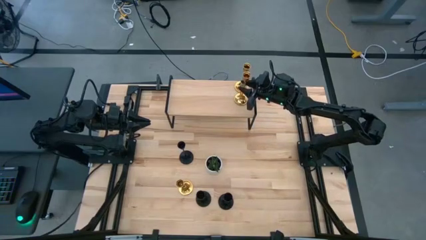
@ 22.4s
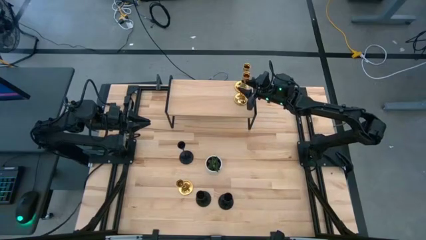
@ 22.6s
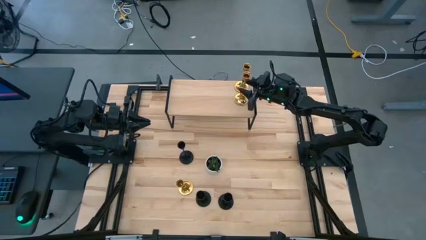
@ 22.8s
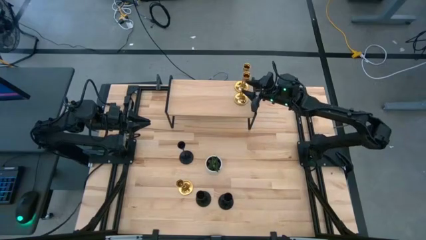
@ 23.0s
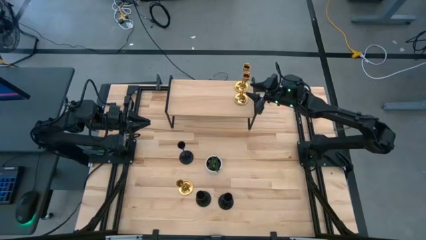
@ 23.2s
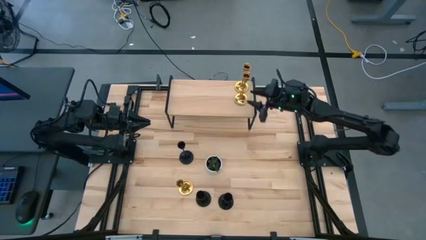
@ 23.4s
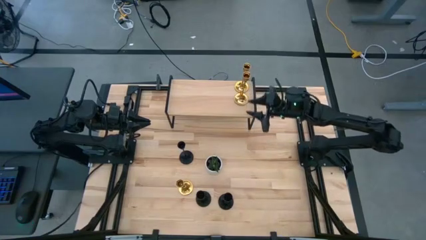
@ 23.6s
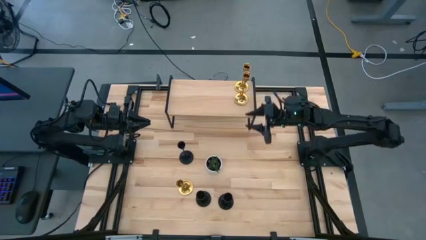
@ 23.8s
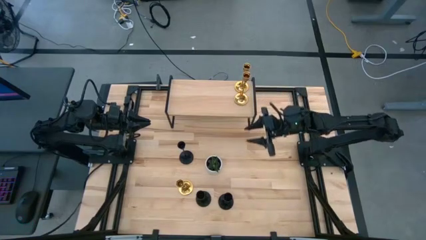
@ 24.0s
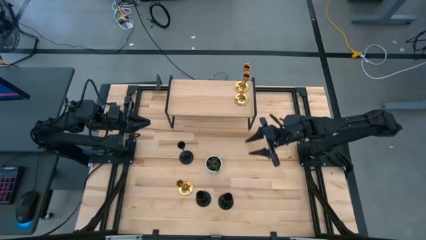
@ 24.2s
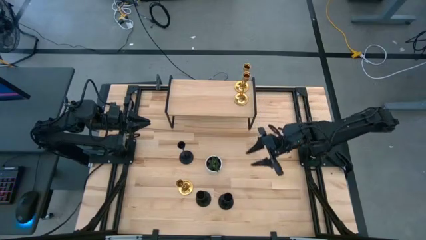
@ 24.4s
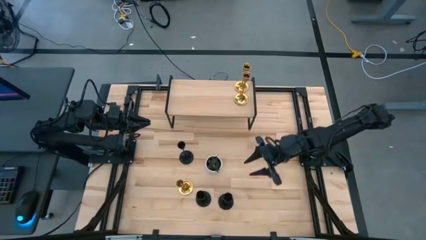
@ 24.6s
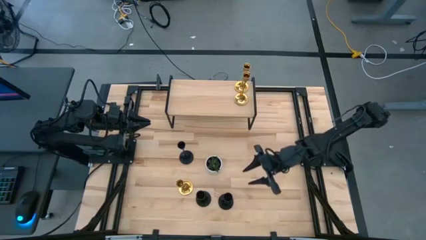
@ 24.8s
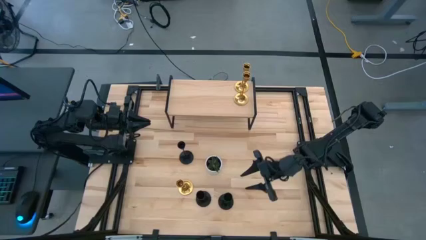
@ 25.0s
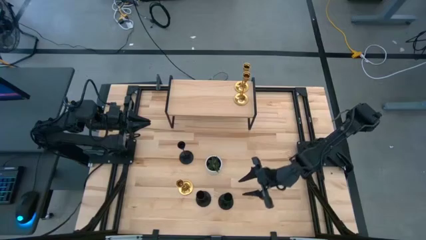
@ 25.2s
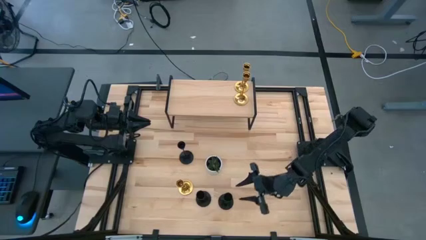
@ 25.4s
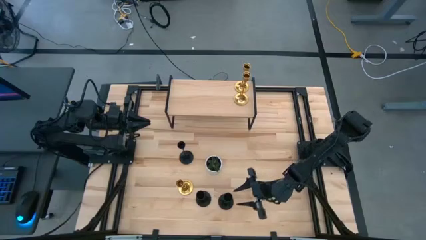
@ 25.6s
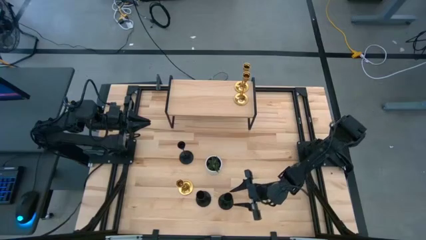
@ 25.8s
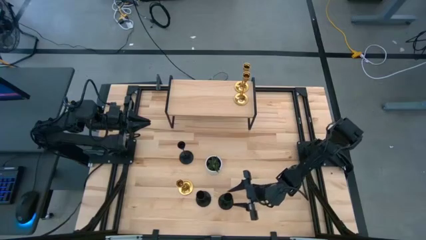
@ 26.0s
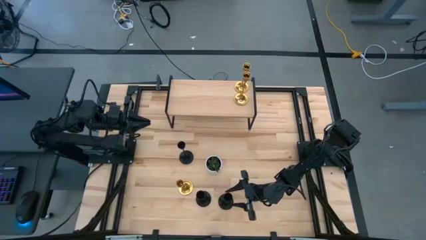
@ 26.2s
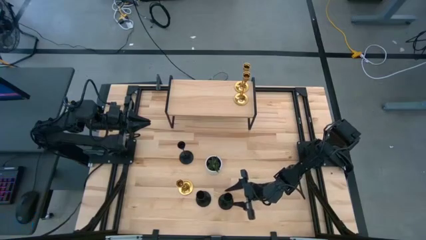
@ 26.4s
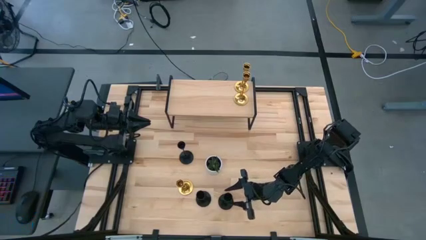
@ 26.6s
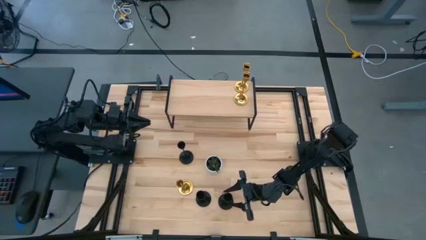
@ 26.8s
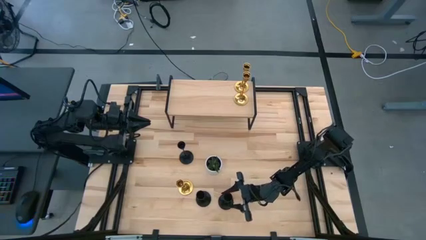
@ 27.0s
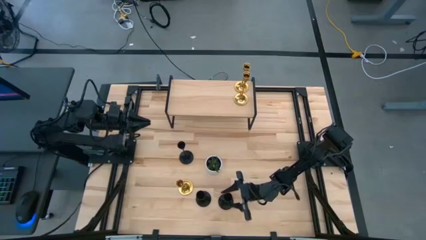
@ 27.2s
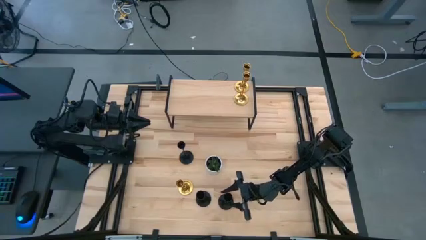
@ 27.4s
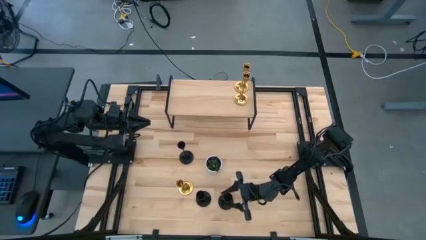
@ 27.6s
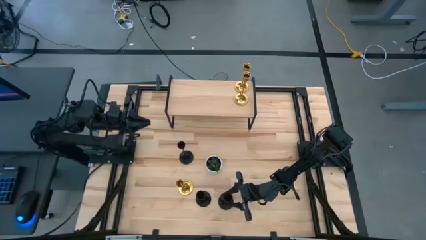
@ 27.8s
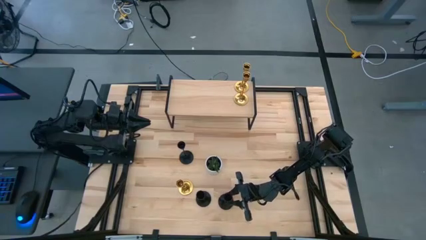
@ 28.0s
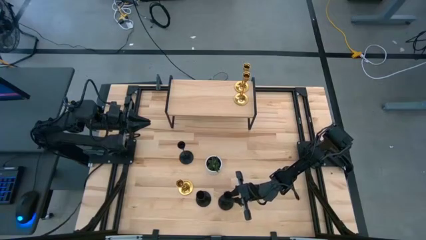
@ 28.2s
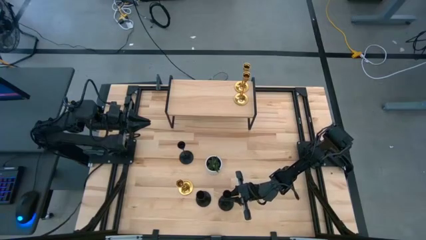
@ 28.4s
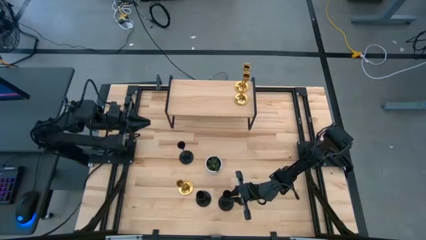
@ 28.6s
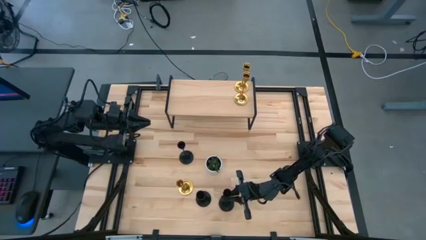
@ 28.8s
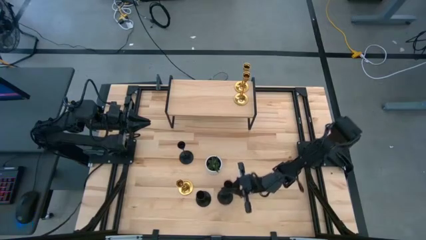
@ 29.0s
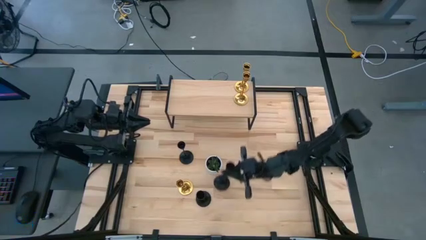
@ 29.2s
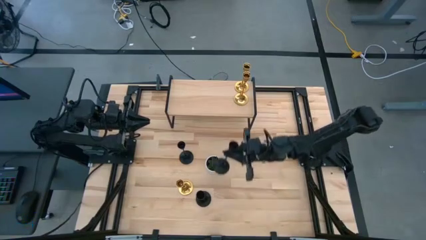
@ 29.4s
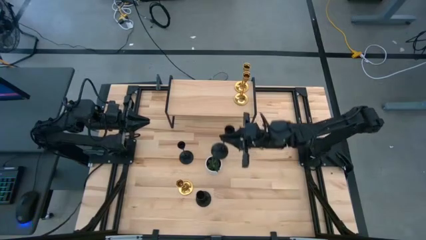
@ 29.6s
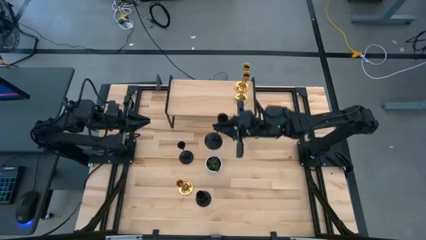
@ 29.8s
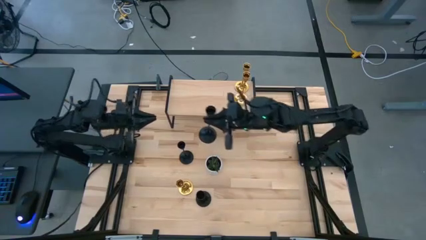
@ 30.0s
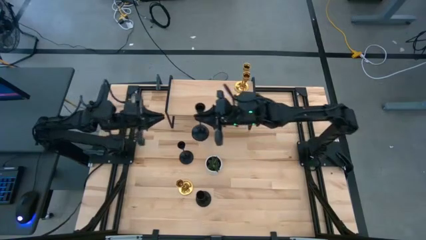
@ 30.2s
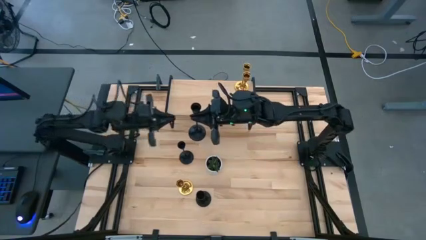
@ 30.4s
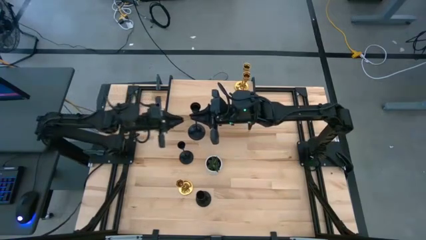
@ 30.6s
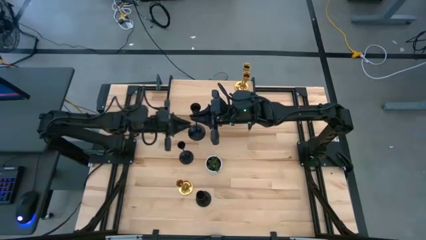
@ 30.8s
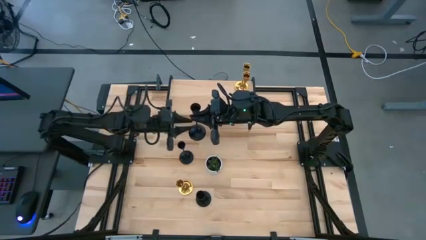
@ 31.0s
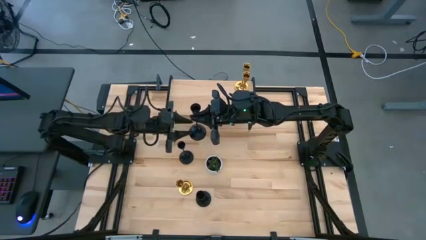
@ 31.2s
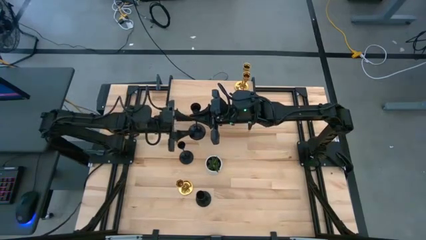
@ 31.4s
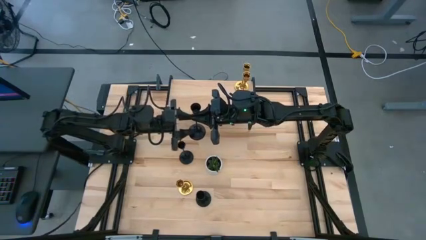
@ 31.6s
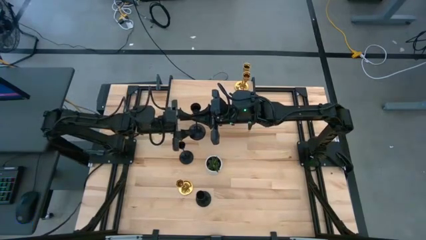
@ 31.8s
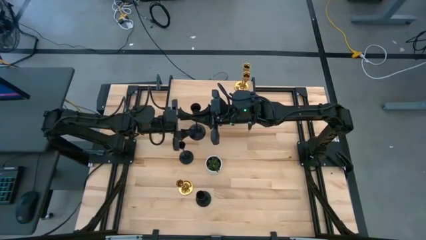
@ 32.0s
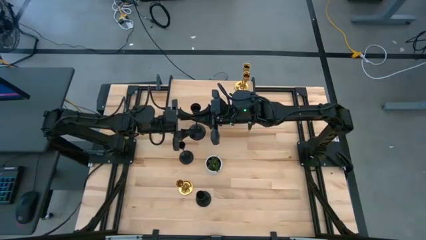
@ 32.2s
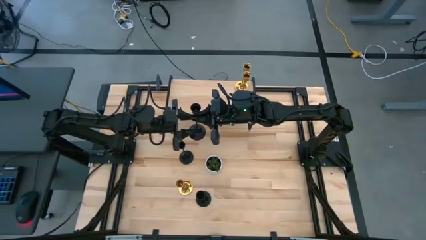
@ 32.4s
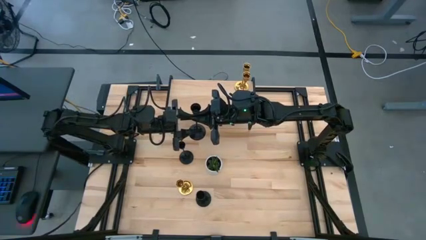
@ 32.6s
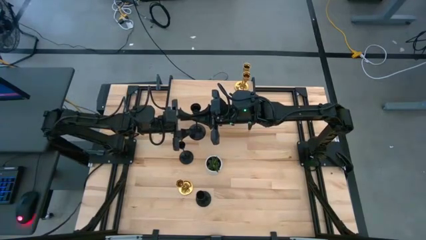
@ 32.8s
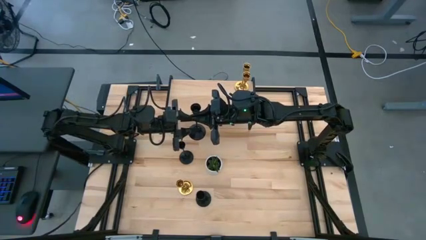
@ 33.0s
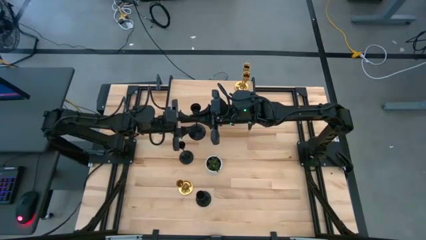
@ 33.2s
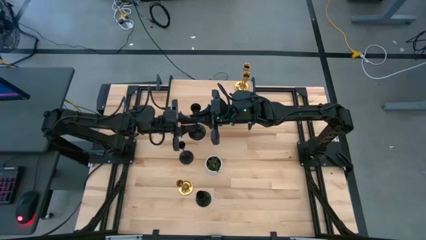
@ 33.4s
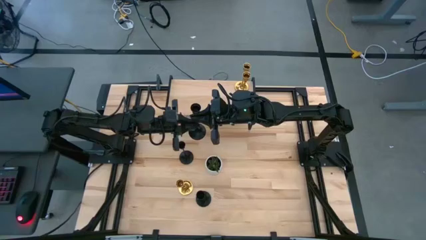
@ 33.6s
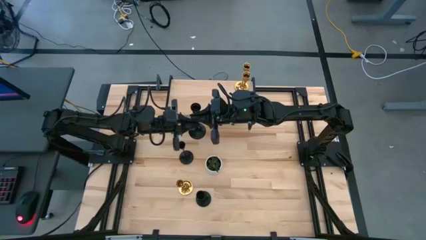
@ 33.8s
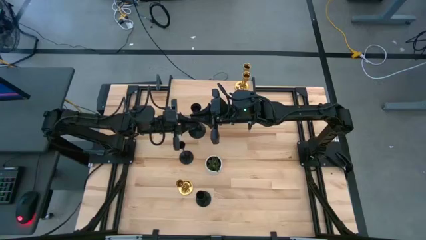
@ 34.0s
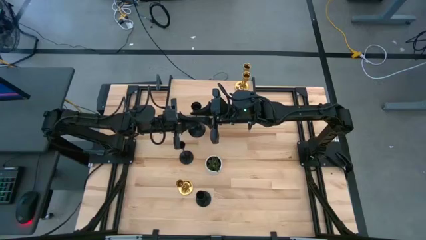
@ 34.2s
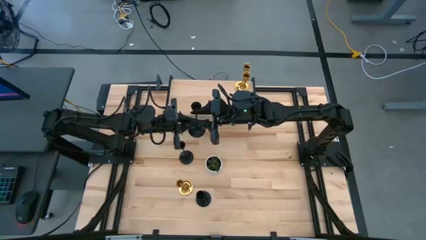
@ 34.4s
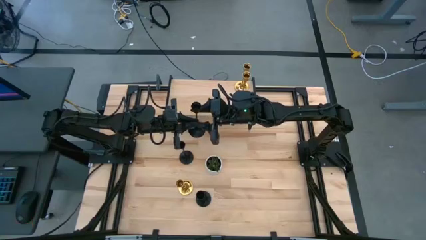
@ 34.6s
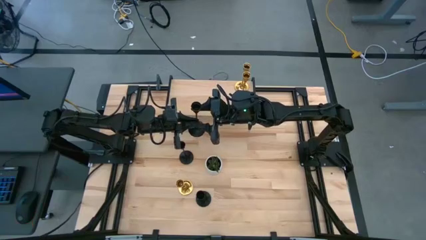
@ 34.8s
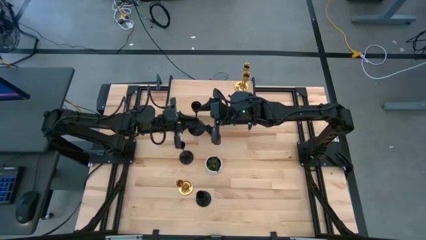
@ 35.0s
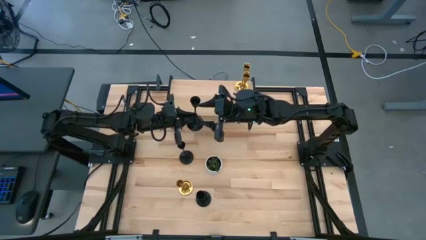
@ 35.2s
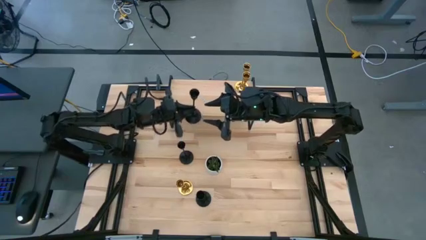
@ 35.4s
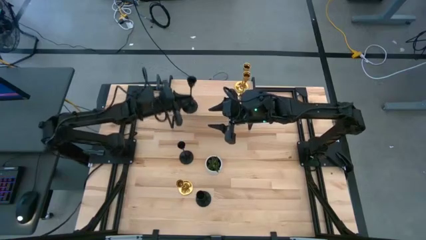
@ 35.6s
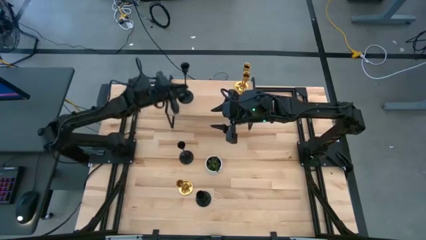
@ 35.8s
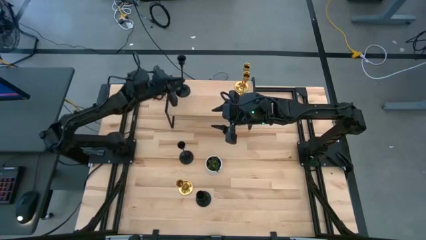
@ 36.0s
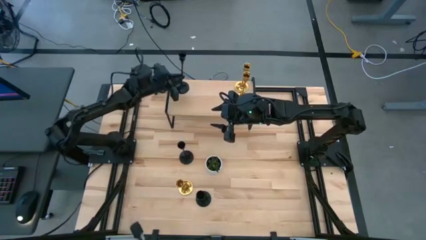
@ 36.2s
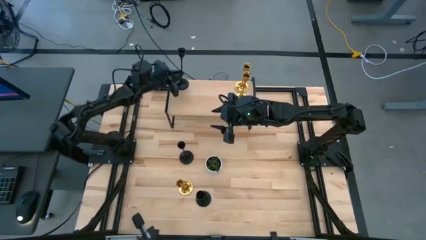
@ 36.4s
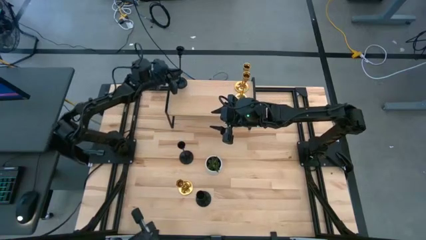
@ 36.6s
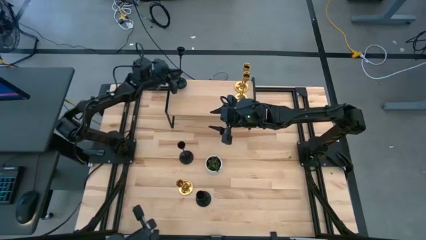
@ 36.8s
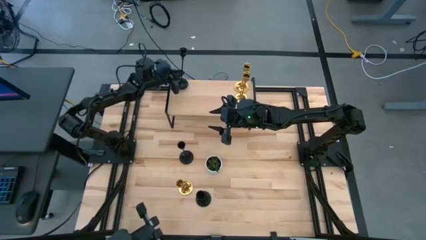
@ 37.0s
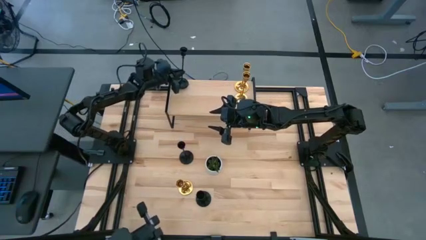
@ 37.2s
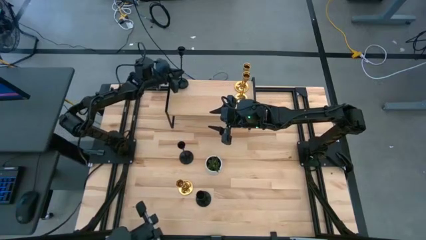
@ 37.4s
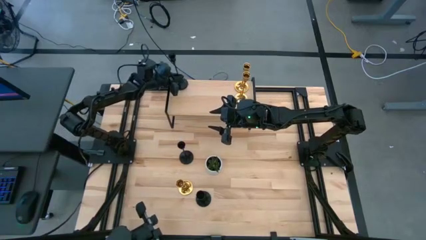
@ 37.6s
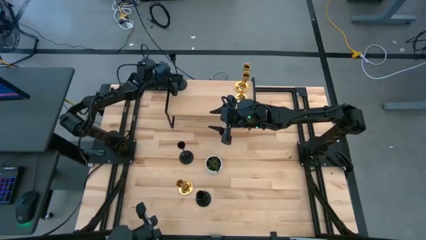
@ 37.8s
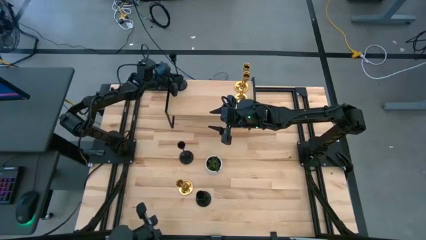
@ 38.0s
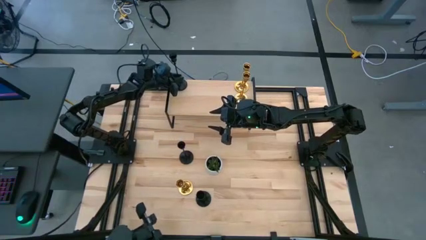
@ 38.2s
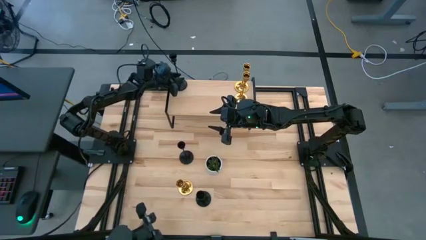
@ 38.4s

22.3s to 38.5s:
Task: Pick & Place candle stick holders
Put the right black candle holder on the shelf
